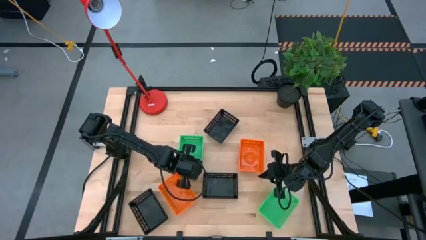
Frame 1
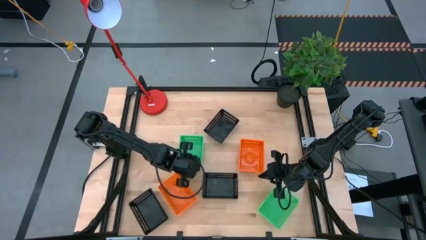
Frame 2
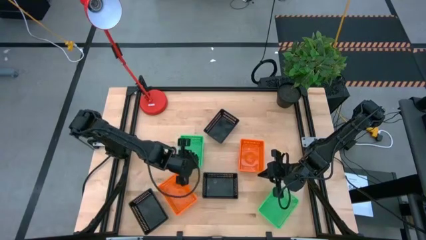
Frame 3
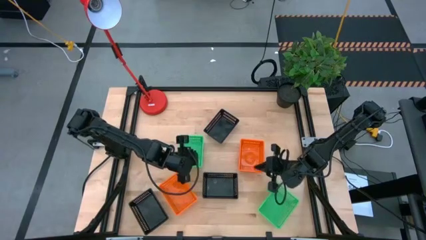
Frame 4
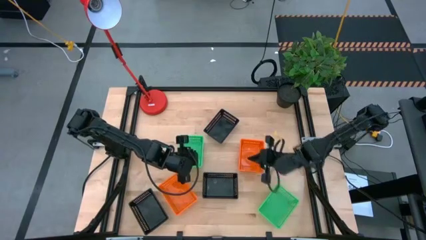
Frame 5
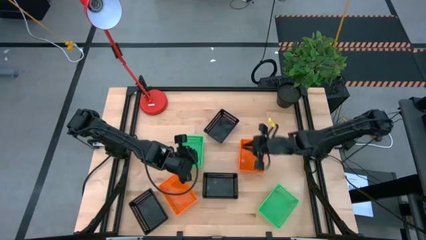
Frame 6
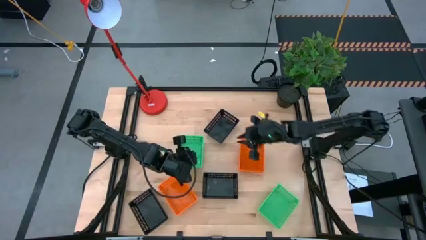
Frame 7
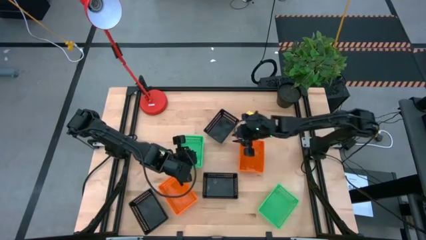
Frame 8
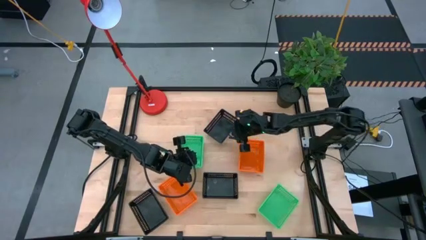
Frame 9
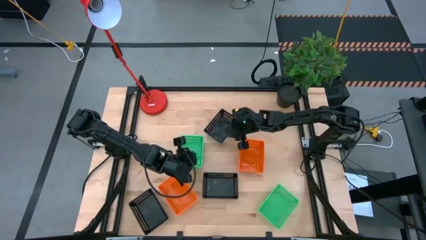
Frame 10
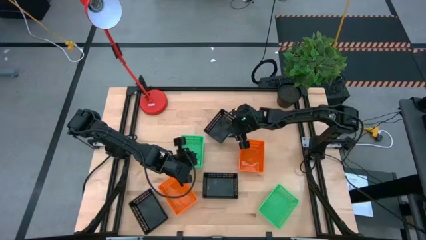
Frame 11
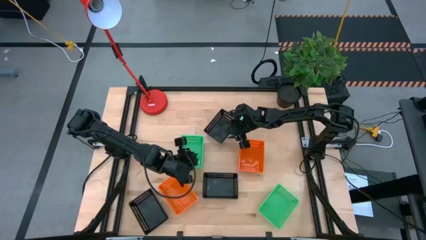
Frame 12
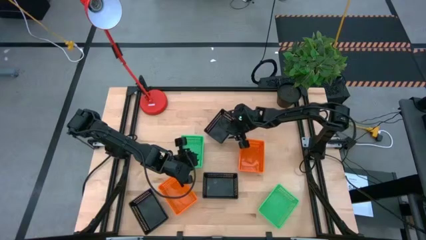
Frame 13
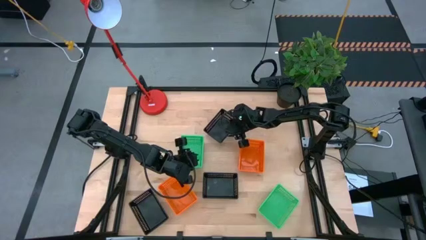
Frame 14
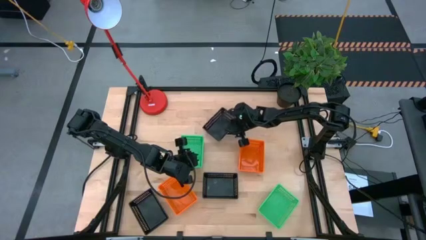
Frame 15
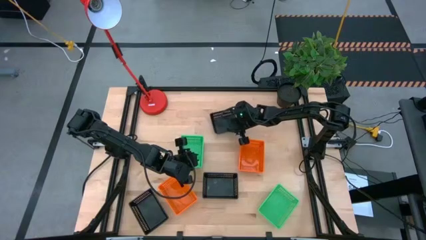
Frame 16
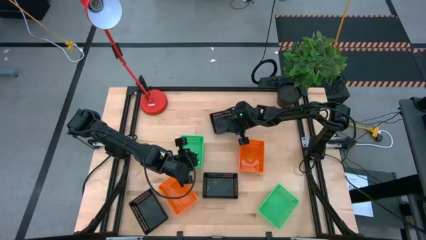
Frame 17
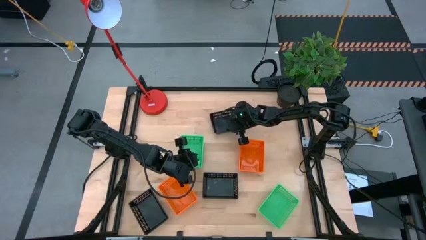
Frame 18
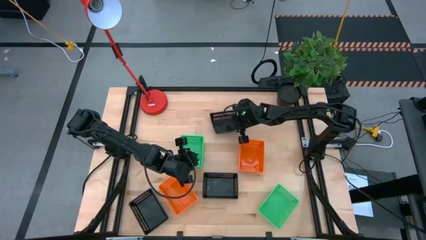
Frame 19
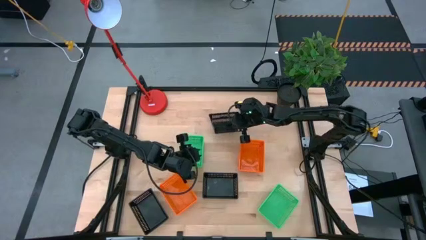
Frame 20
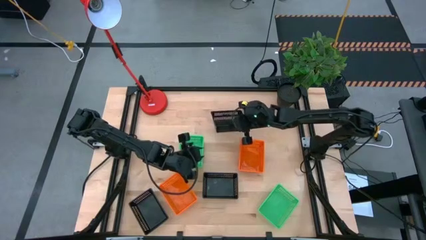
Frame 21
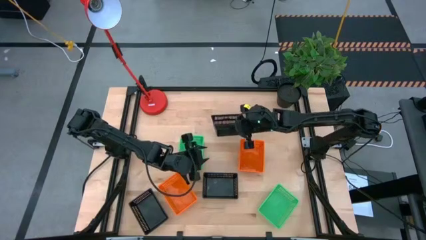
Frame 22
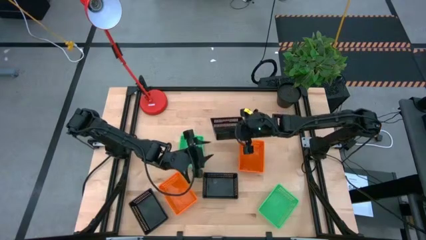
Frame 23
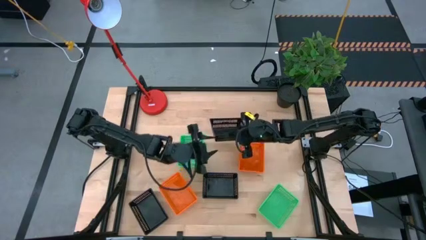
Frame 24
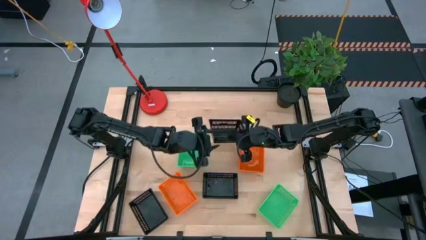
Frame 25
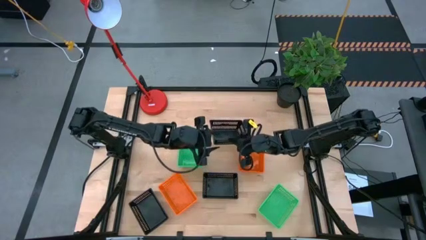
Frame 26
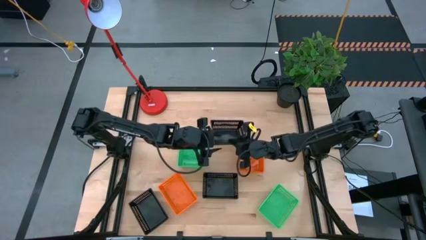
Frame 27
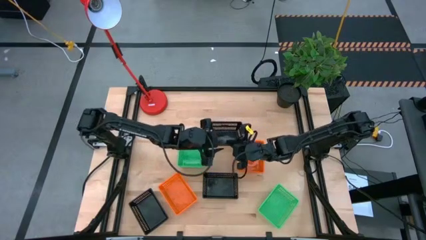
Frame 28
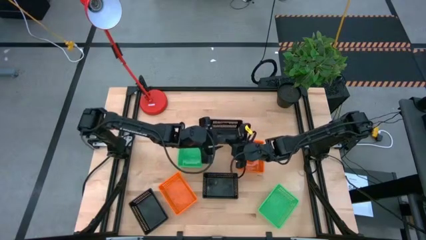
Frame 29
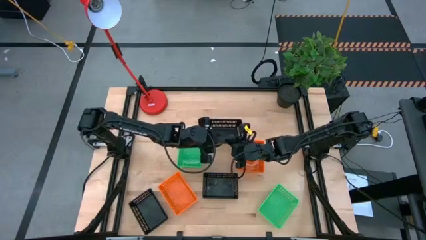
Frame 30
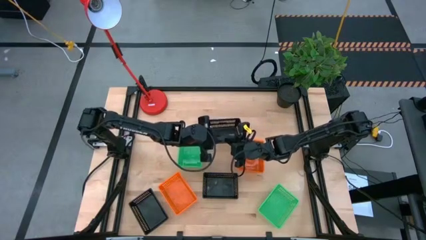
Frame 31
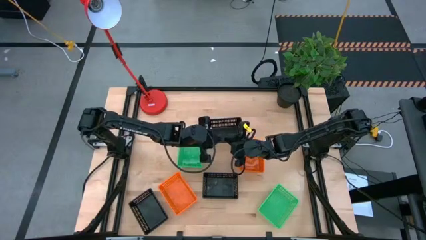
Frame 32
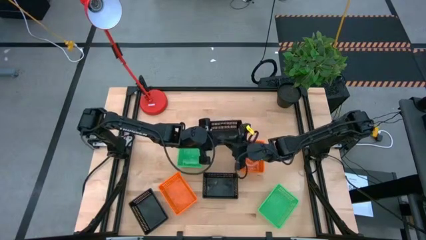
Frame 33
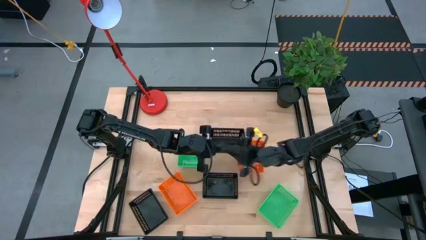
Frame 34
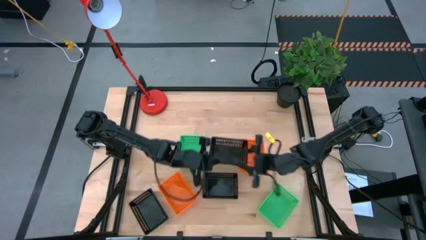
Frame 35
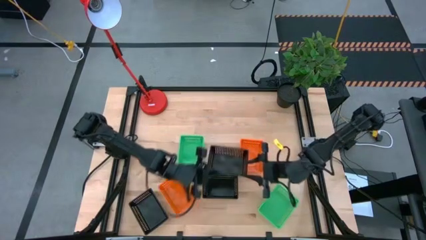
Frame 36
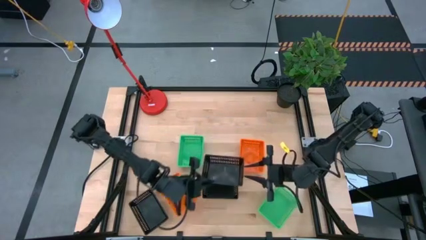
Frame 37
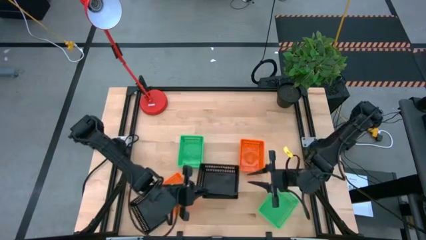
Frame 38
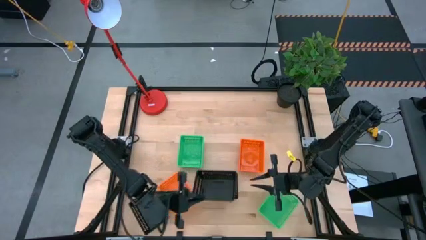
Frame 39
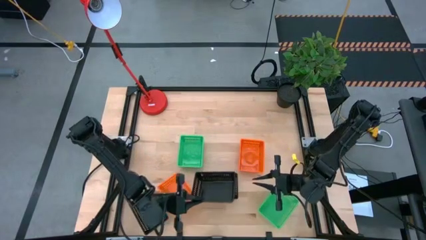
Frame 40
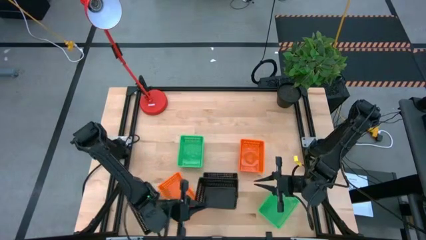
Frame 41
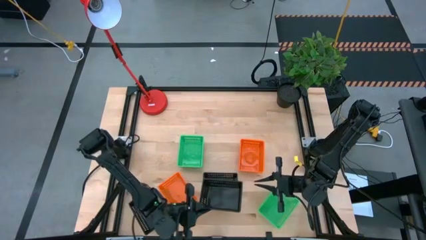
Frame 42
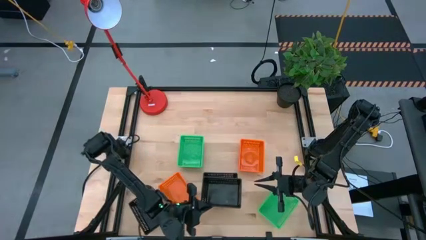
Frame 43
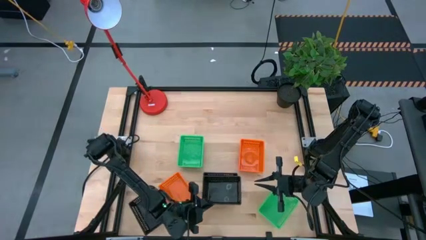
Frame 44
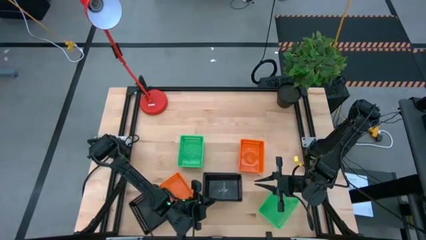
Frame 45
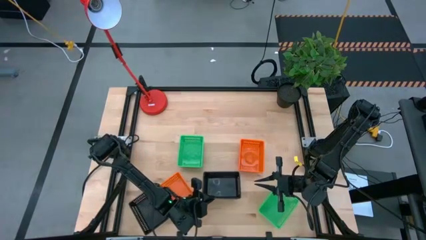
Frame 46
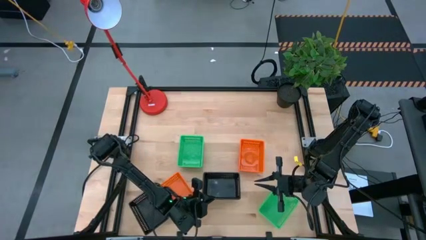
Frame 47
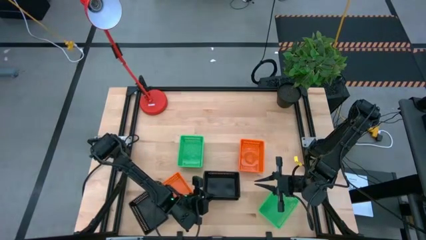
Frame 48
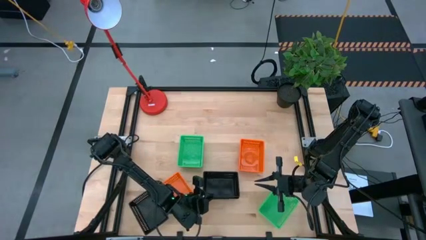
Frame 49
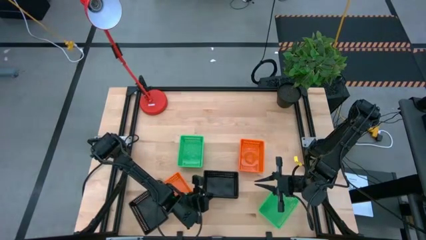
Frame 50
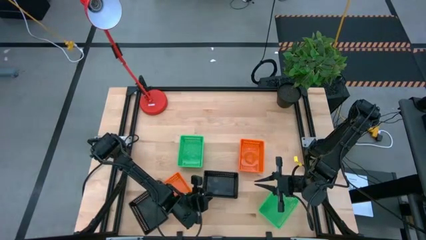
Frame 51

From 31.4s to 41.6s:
Stack the top black bin on top of the middle black bin

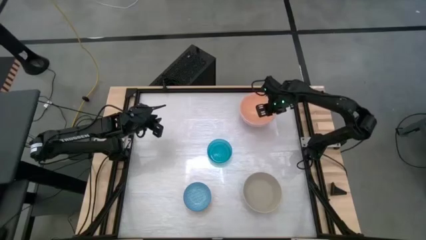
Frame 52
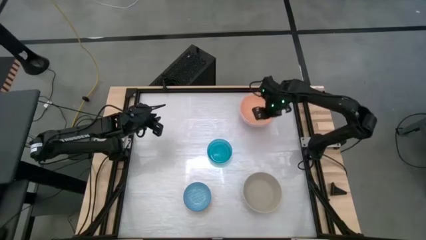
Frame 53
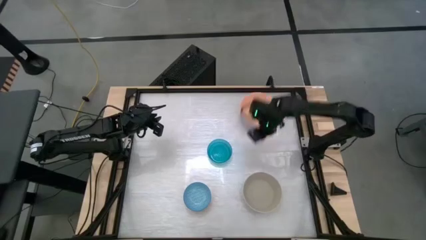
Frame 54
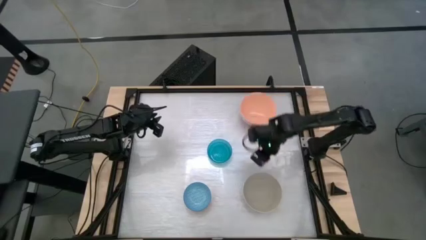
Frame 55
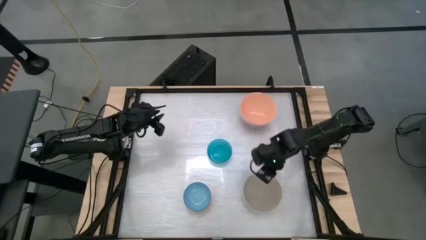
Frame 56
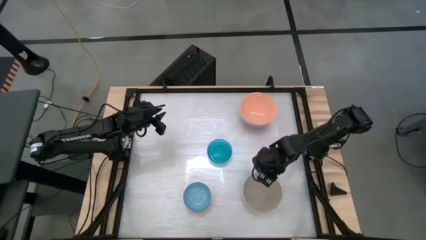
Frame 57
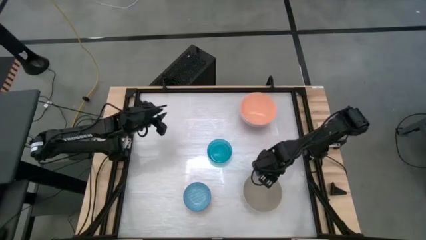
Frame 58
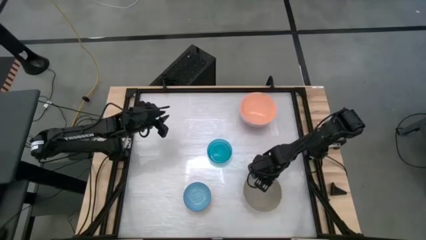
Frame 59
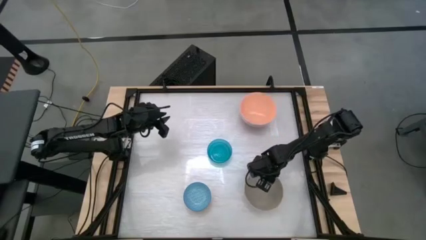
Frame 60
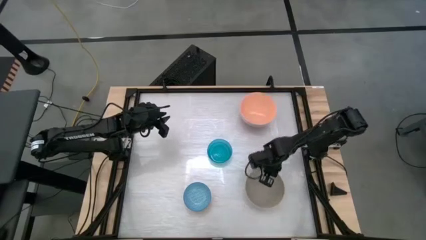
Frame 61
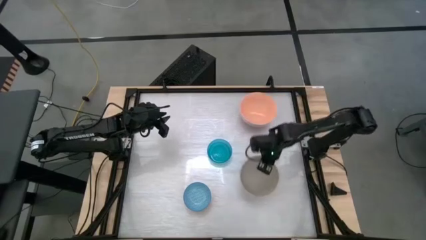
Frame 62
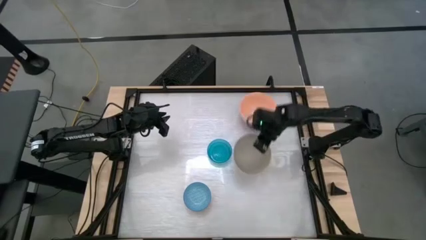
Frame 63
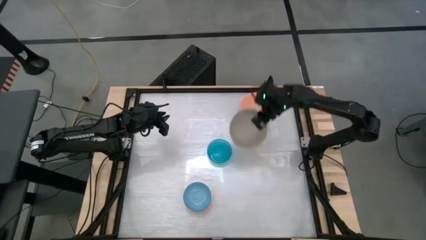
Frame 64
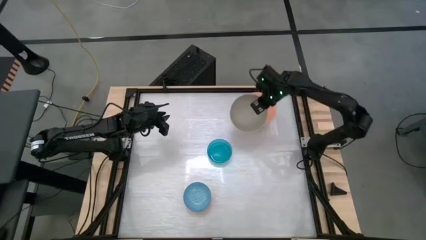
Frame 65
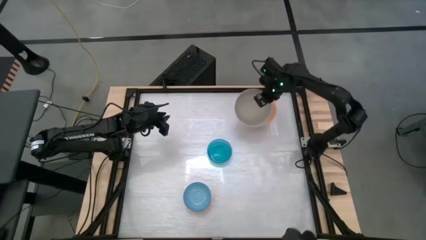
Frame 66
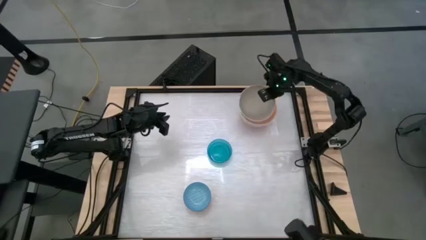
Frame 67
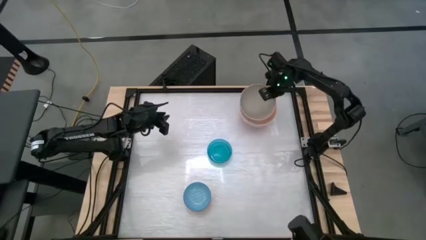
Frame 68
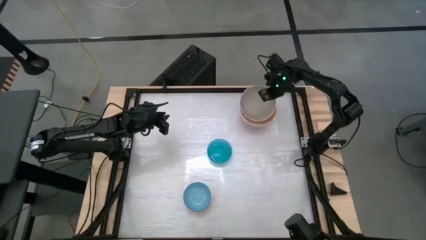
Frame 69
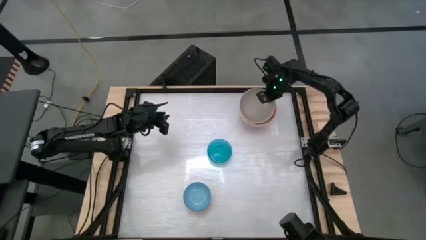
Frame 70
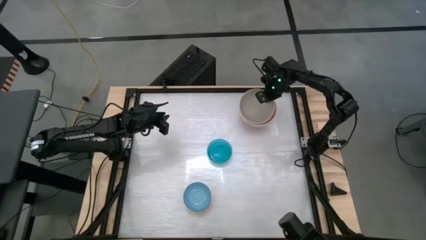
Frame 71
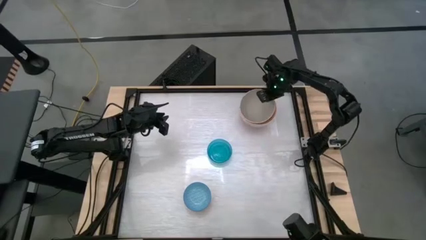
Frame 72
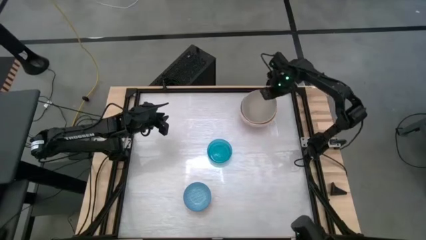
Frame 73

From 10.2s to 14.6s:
Stack the gray bowl on top of the orange bowl
